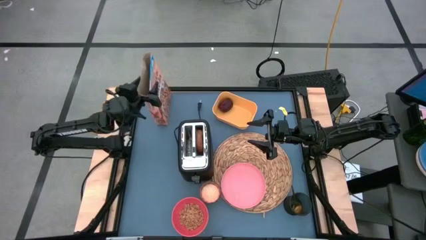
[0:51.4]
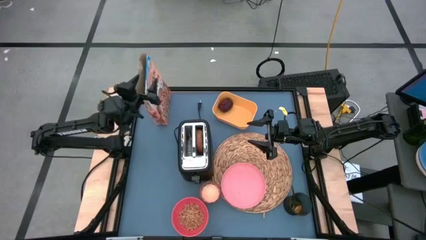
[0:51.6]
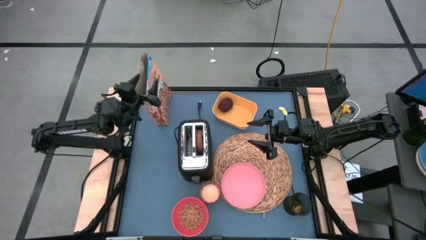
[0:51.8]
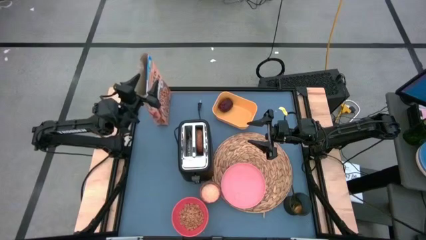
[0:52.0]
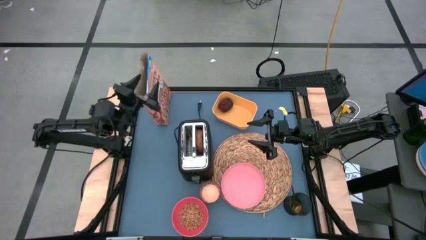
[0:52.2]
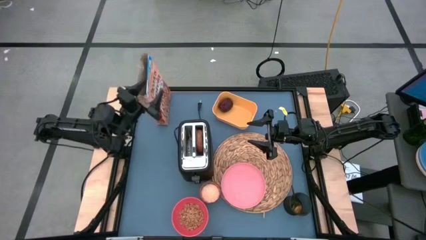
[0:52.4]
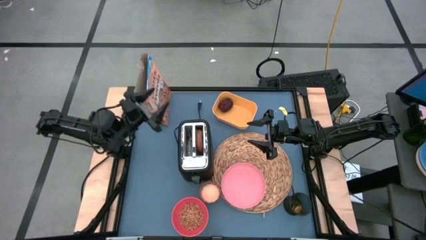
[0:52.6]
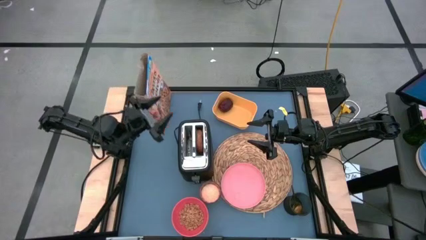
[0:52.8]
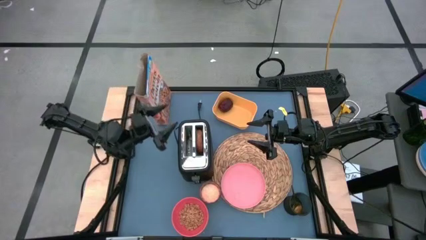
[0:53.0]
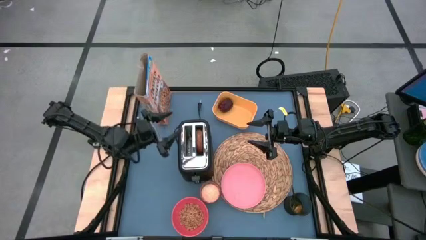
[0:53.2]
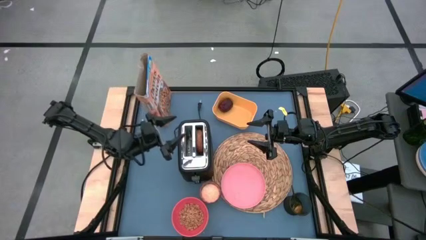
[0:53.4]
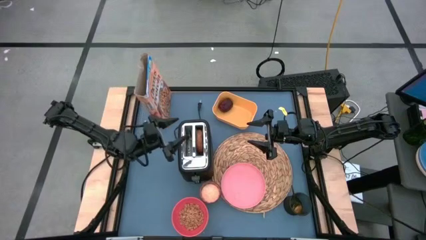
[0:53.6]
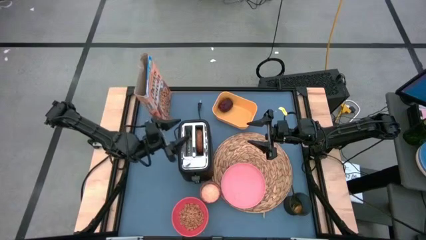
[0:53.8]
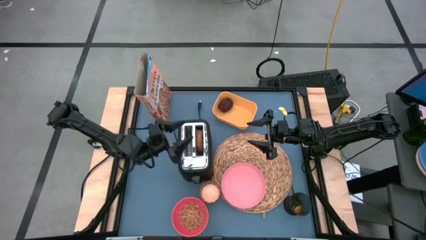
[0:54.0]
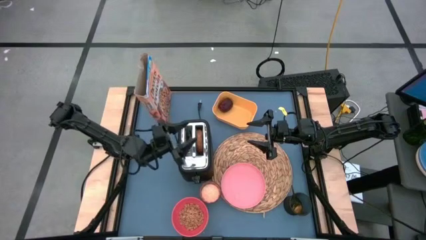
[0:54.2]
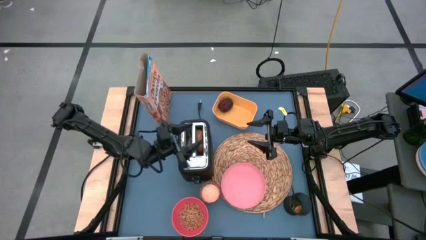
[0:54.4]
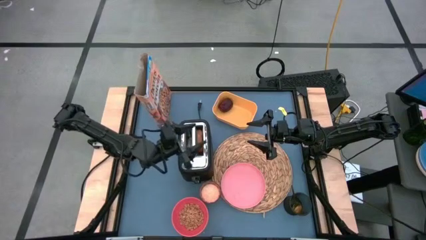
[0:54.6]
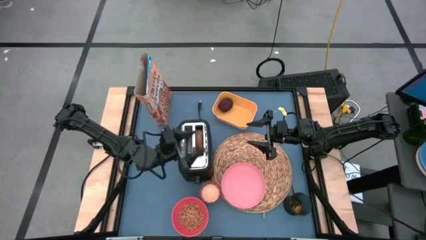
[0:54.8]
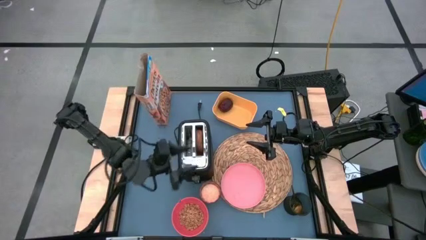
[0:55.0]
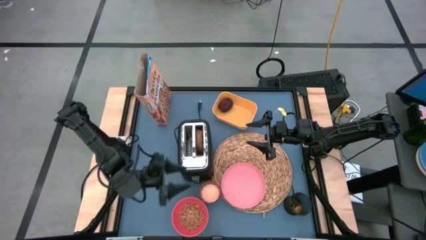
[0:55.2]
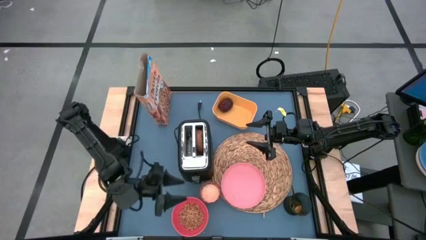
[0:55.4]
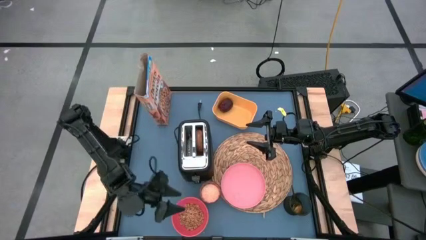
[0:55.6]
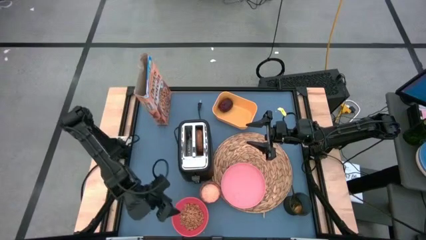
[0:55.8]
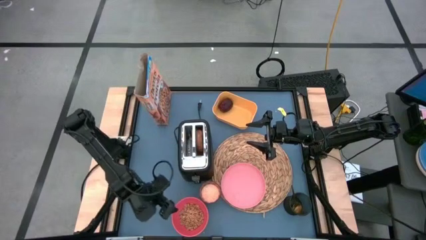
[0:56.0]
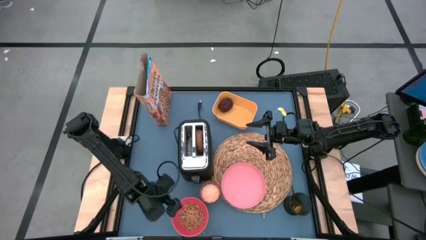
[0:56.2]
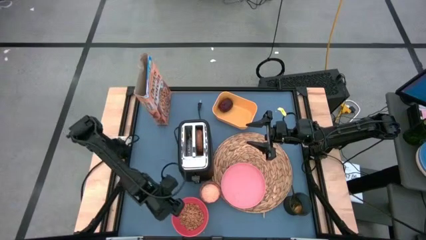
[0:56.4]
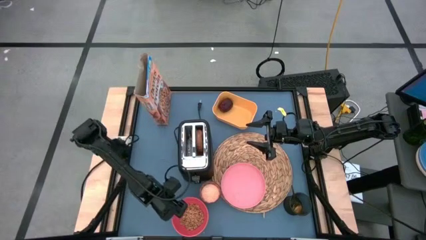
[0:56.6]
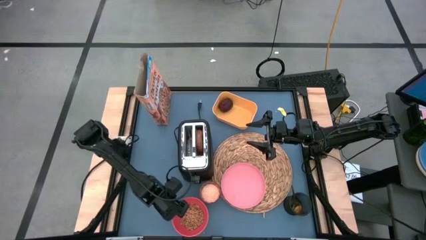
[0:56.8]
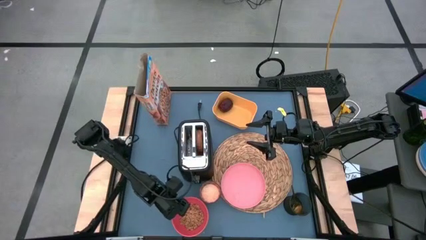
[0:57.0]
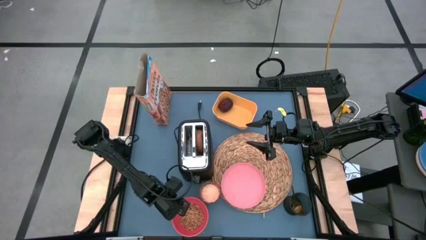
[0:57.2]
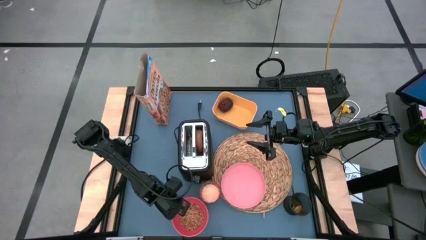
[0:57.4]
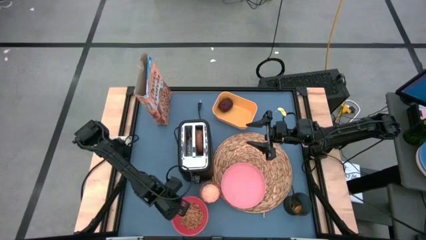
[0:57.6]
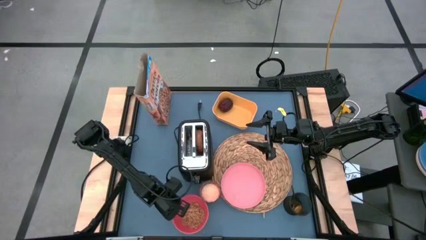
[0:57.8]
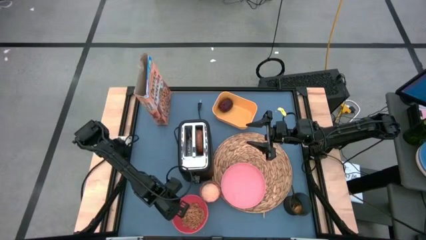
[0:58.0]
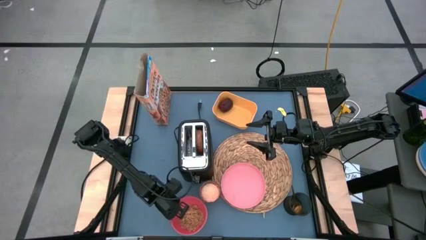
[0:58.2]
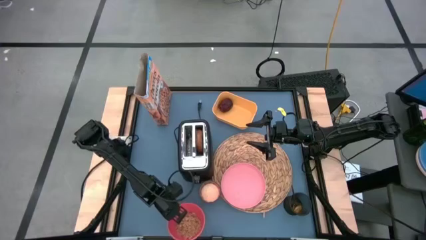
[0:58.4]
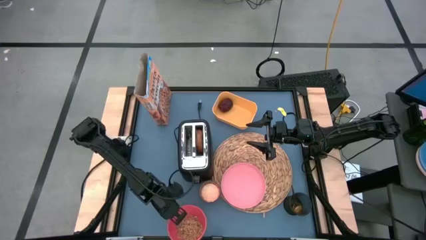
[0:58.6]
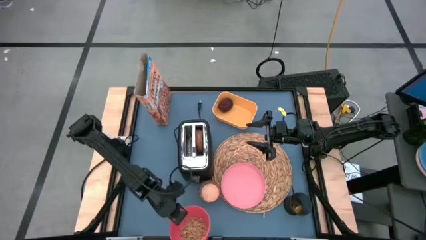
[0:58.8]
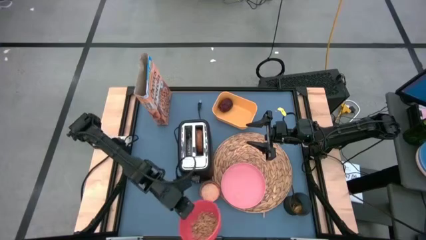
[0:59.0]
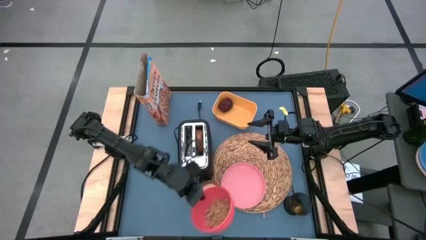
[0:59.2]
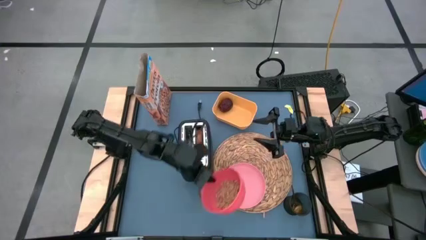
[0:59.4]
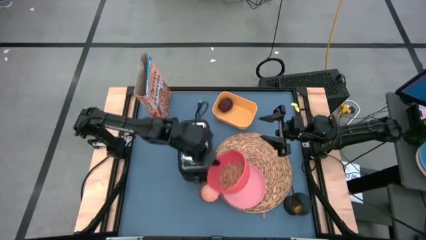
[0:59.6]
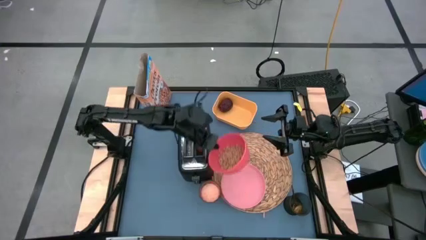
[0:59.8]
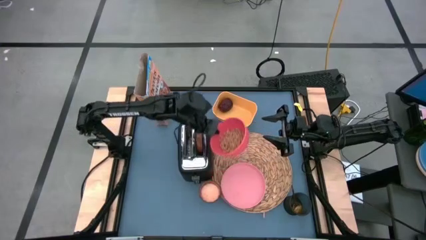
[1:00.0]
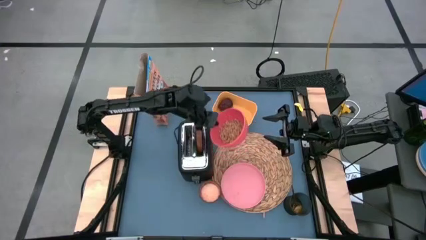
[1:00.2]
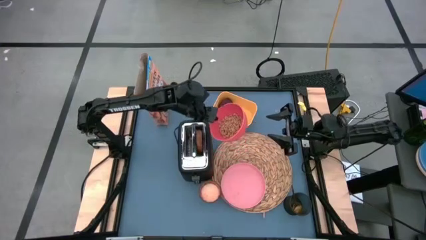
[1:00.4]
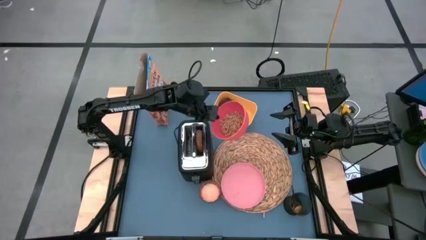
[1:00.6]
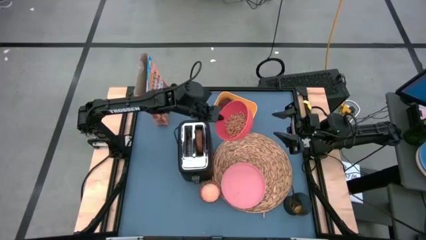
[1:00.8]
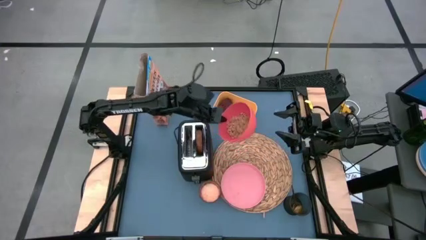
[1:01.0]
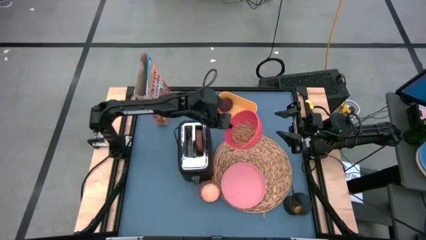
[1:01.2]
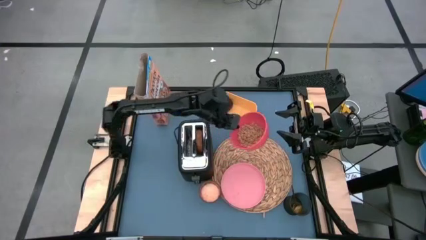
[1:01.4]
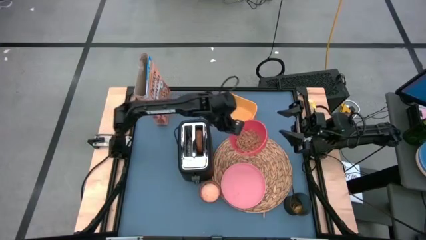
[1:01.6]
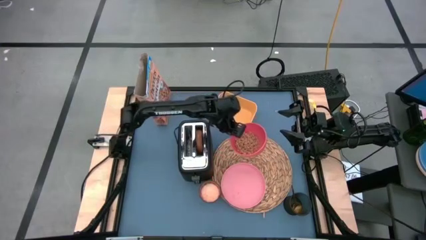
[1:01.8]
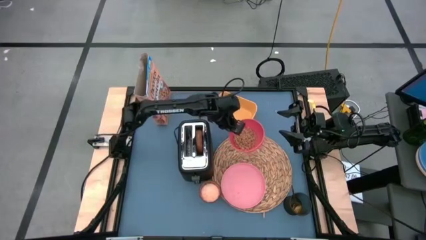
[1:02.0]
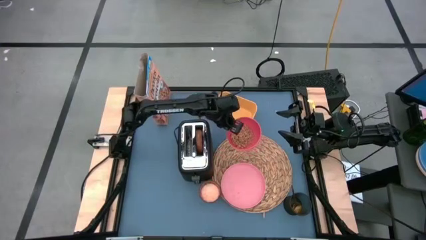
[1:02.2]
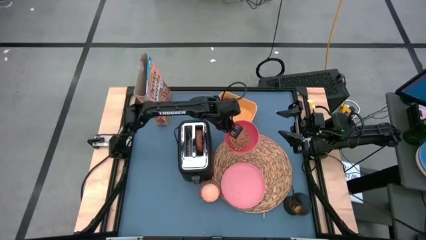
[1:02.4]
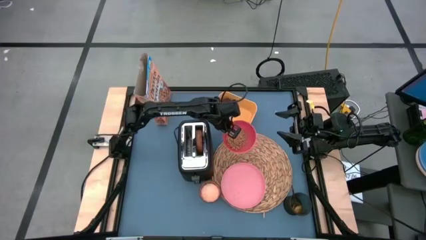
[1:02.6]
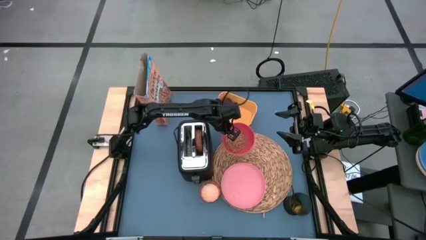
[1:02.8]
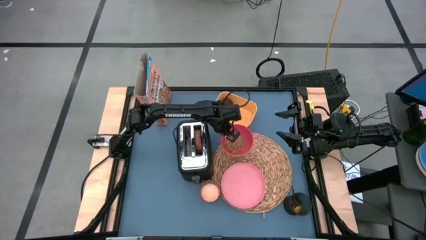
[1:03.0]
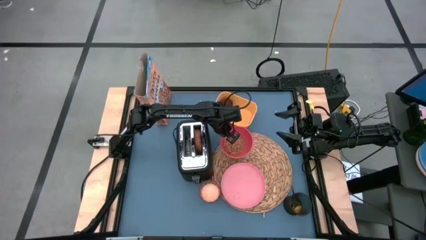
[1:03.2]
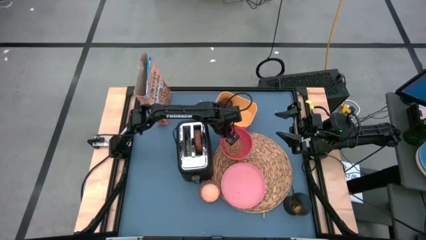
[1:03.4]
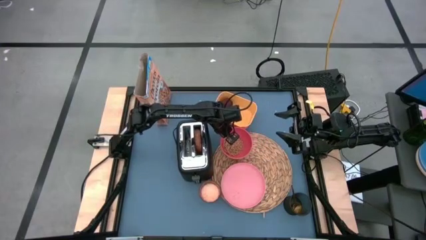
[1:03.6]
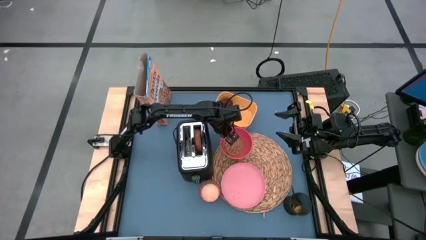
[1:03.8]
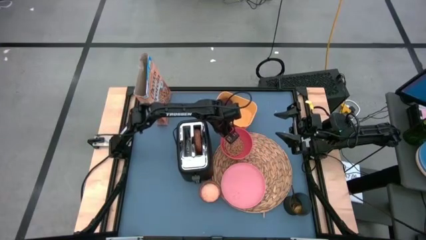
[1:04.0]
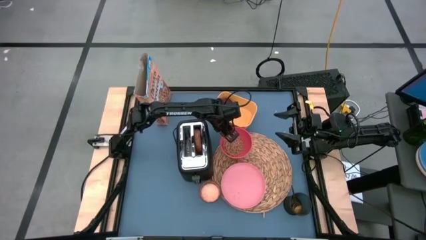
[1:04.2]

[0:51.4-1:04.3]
Task: Arrange a breakfast setting
Put the orange bowl on the table mat
